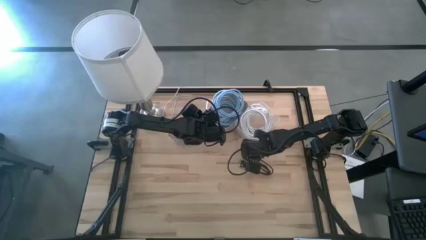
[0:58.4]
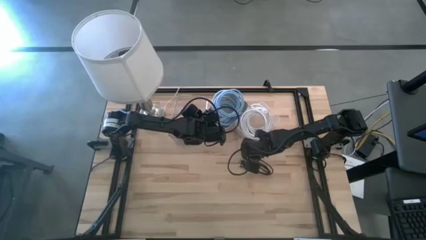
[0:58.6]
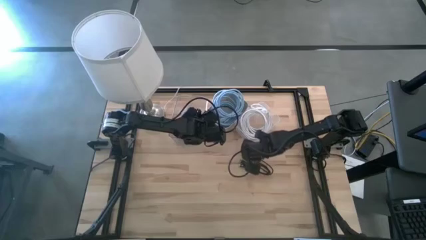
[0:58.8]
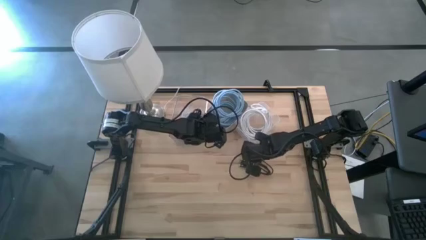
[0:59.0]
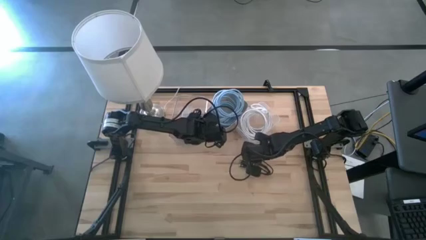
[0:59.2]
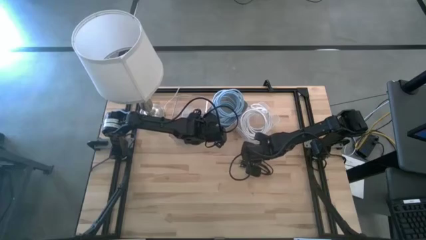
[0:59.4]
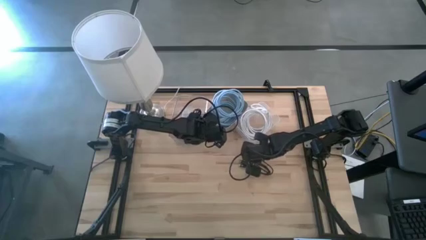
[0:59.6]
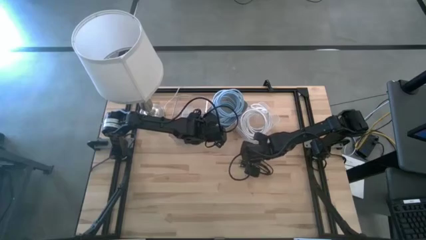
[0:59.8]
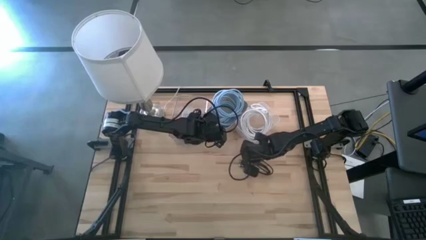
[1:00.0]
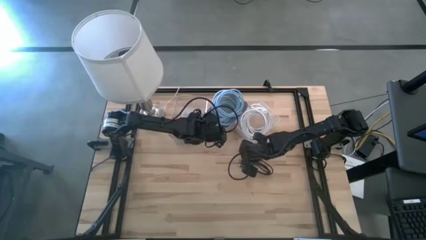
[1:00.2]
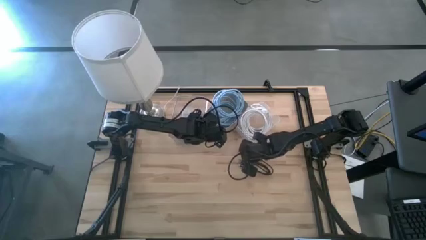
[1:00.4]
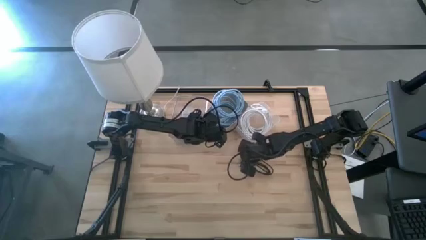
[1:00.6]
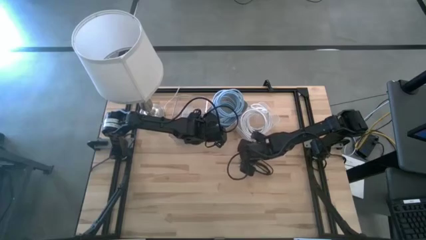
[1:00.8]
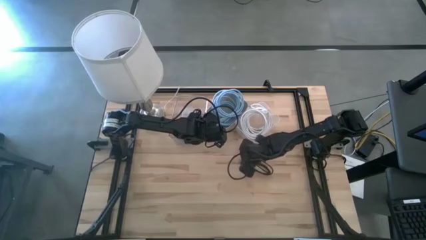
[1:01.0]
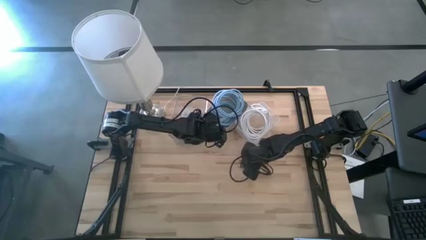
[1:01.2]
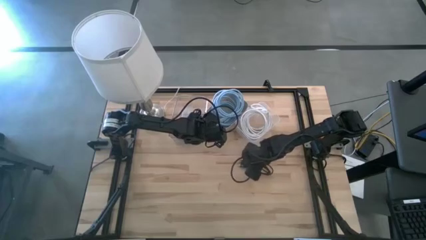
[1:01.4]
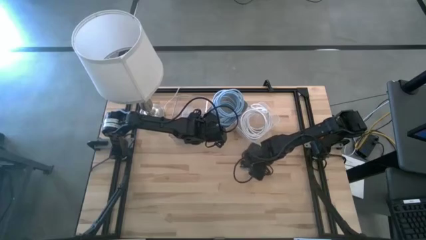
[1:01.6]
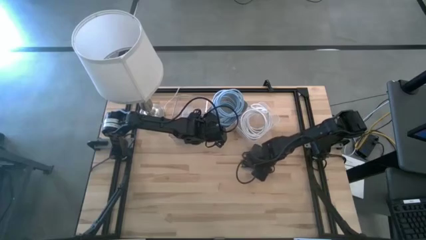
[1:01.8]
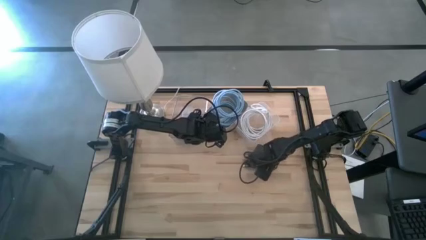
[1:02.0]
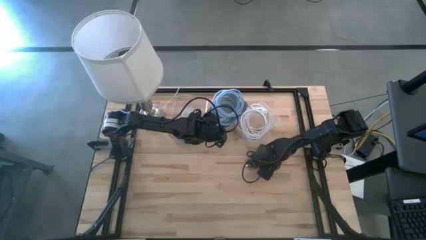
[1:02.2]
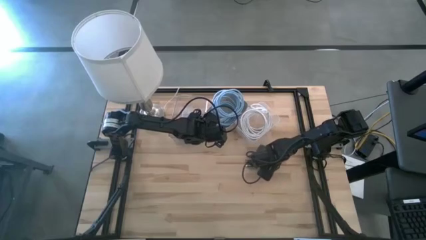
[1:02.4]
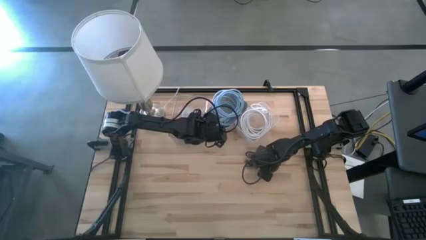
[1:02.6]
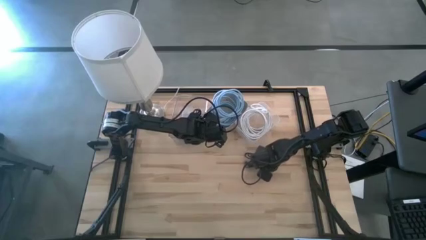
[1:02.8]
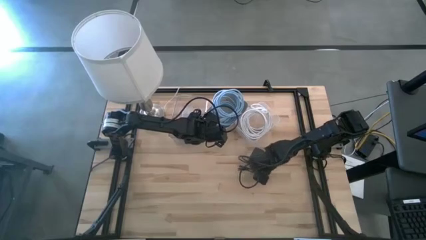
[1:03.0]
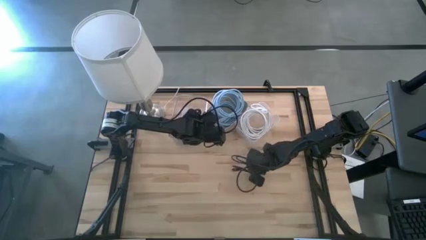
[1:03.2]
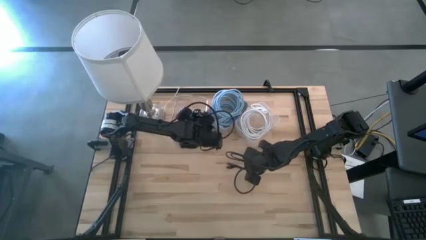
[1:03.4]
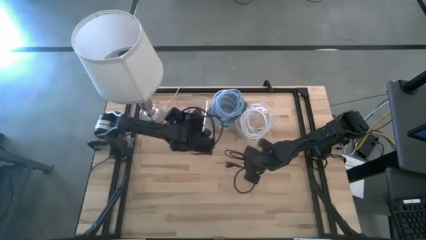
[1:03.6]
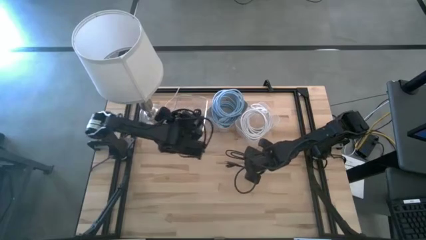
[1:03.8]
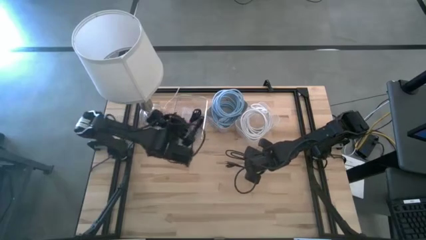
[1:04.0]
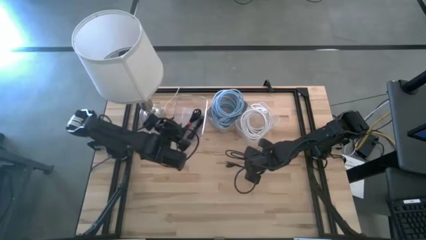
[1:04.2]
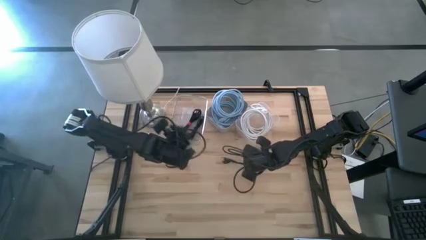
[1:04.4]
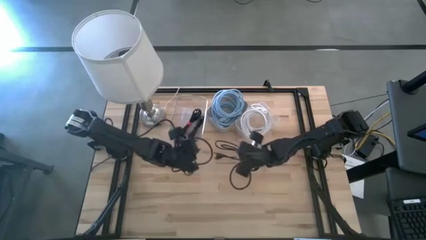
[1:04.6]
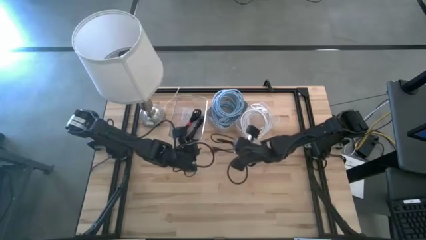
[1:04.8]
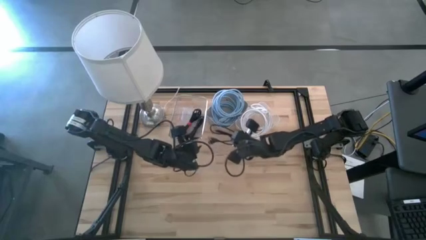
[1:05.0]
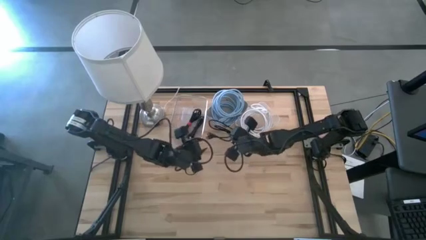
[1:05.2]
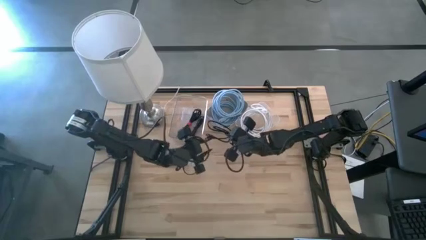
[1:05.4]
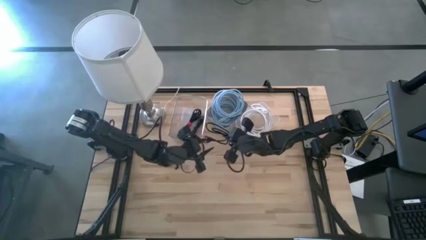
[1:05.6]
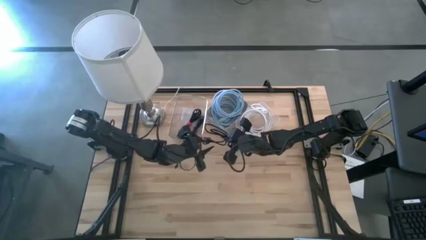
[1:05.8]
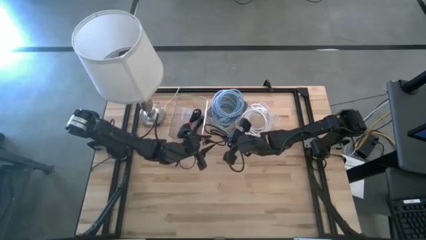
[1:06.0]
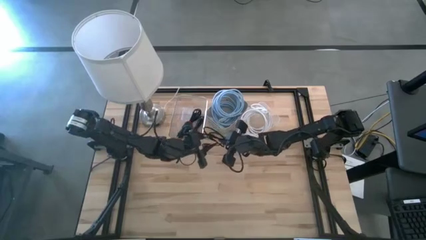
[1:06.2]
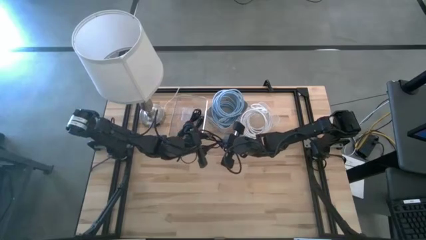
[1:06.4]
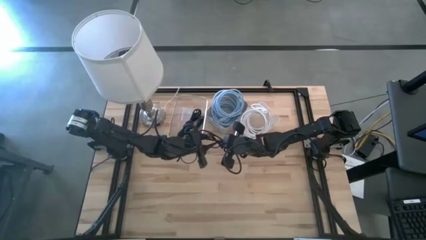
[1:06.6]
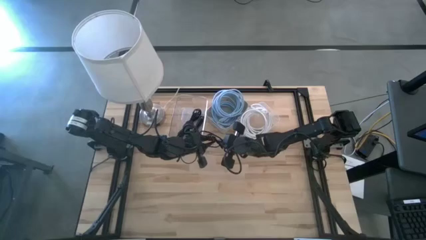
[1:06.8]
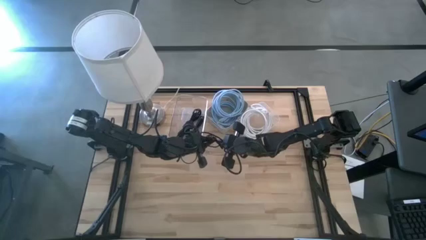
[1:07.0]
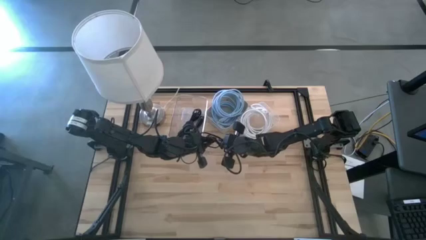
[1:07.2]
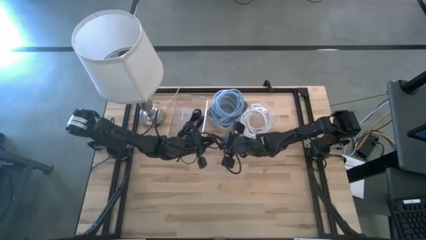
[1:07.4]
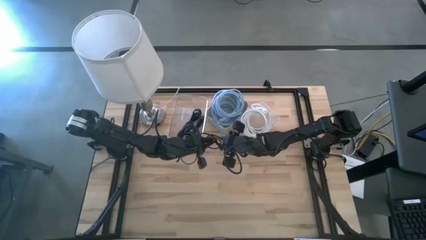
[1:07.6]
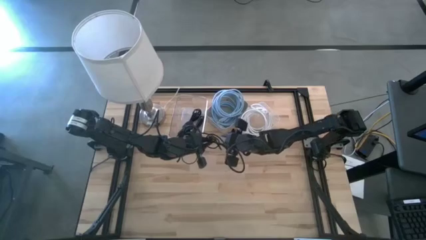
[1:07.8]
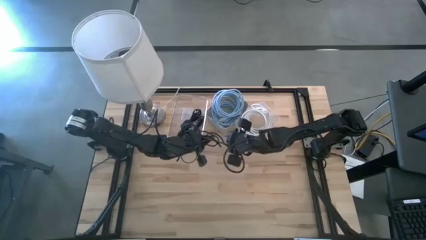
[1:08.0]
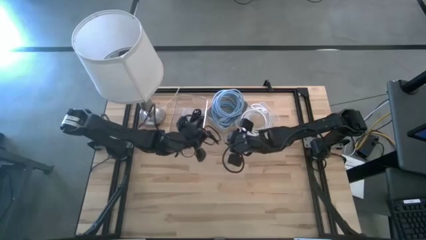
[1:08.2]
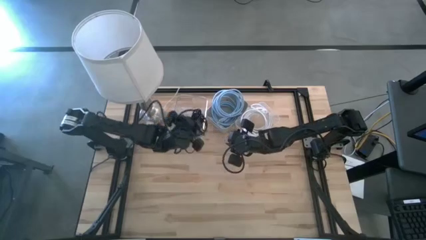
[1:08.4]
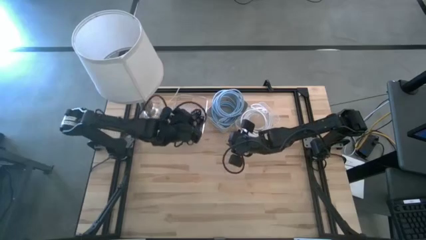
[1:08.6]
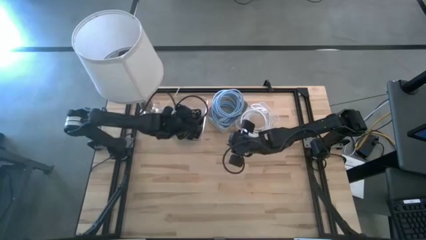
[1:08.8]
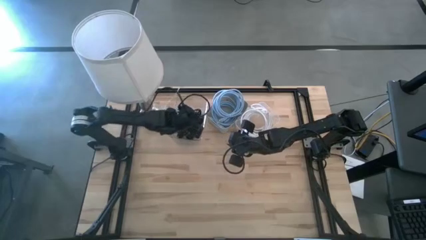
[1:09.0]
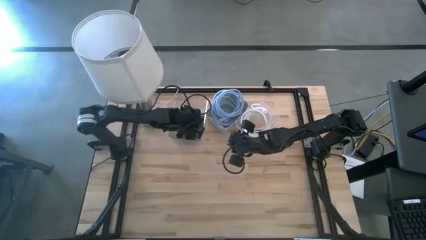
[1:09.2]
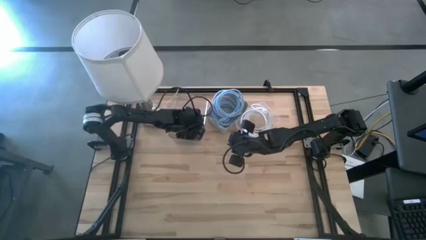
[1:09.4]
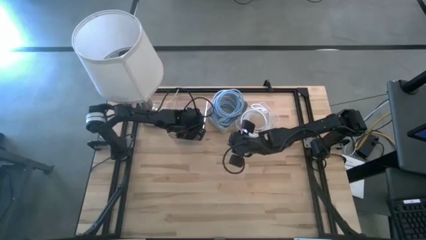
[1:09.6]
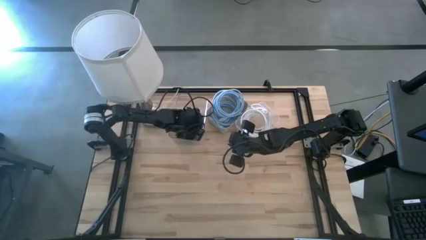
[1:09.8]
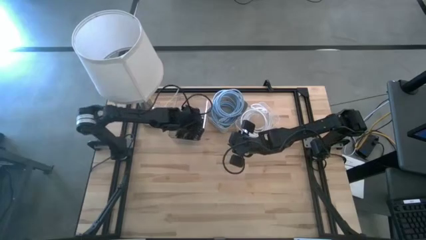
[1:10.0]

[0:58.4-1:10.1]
Task: Sort HDMI cables
Put the black HDMI cable into the left transparent bin

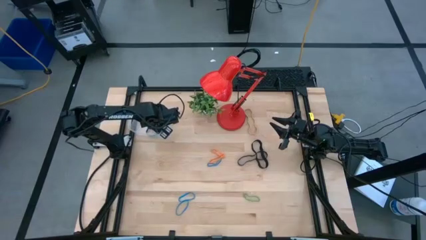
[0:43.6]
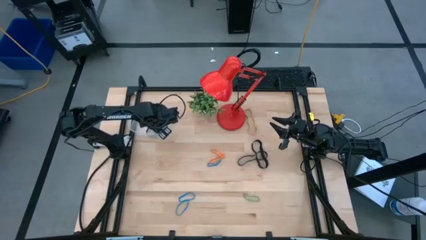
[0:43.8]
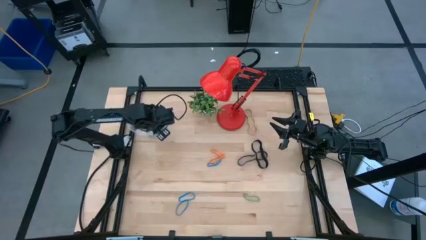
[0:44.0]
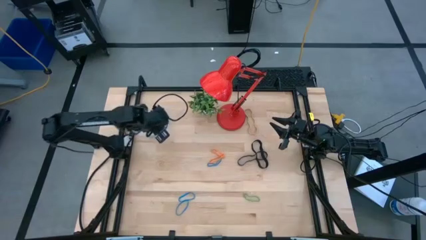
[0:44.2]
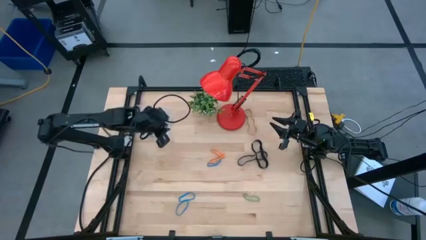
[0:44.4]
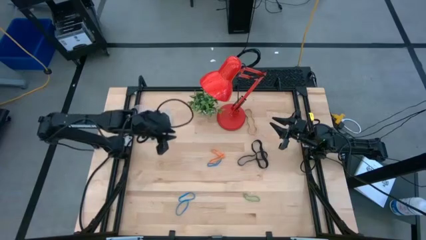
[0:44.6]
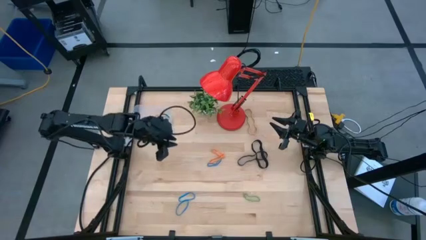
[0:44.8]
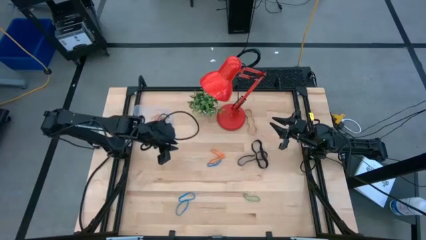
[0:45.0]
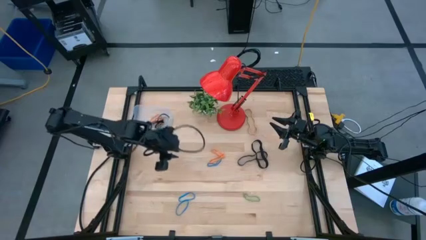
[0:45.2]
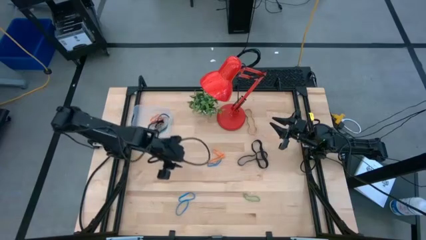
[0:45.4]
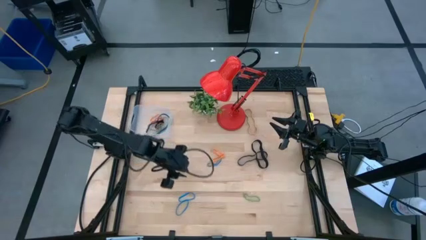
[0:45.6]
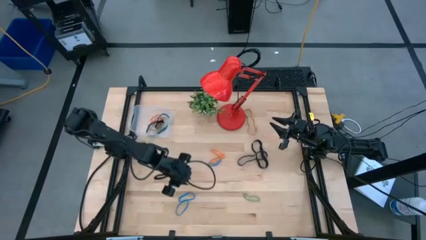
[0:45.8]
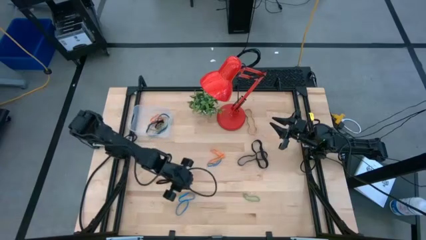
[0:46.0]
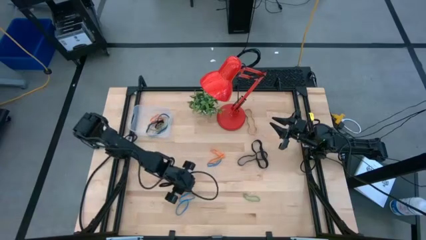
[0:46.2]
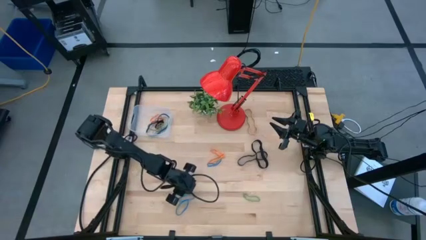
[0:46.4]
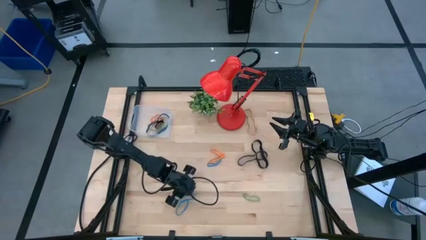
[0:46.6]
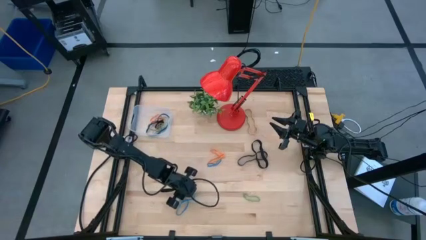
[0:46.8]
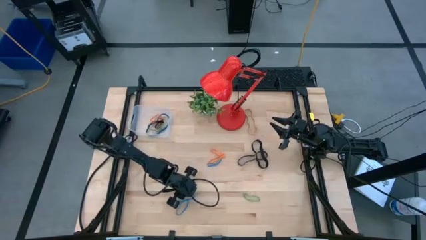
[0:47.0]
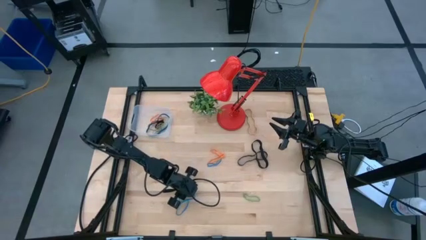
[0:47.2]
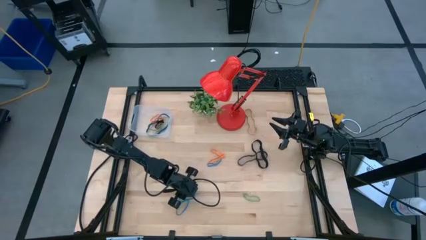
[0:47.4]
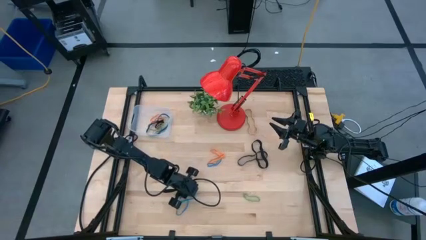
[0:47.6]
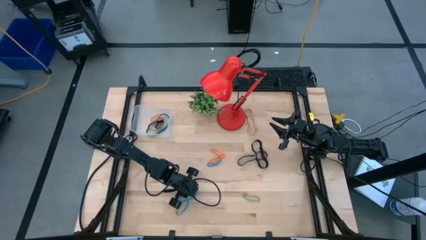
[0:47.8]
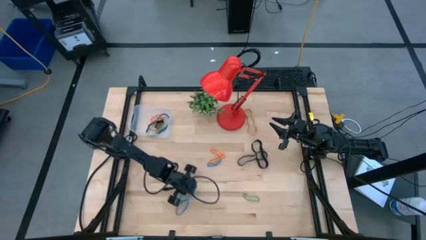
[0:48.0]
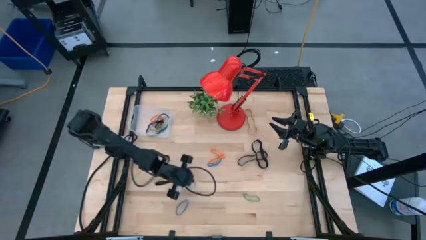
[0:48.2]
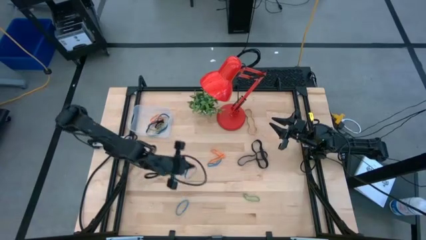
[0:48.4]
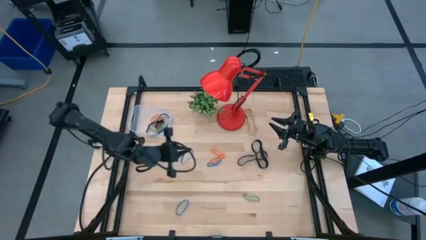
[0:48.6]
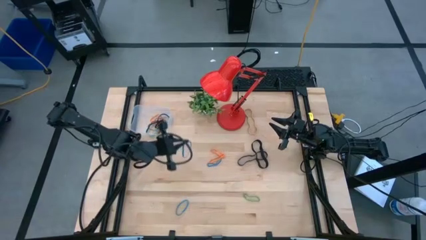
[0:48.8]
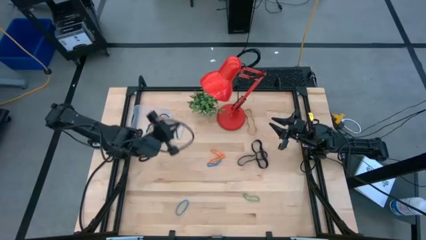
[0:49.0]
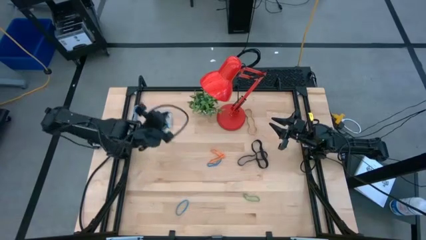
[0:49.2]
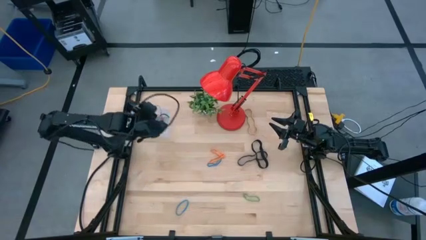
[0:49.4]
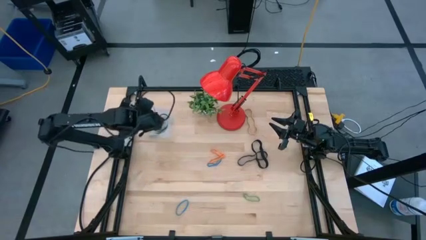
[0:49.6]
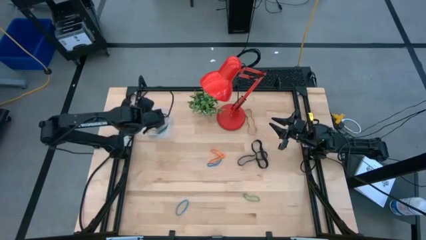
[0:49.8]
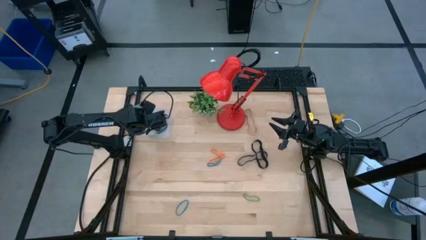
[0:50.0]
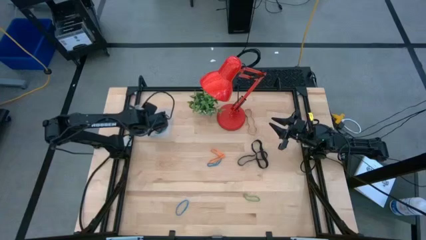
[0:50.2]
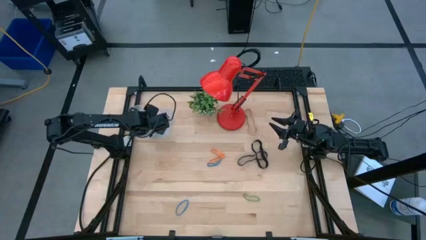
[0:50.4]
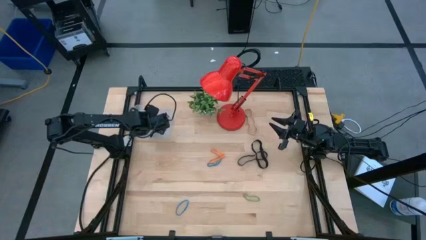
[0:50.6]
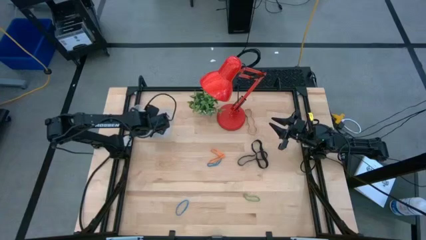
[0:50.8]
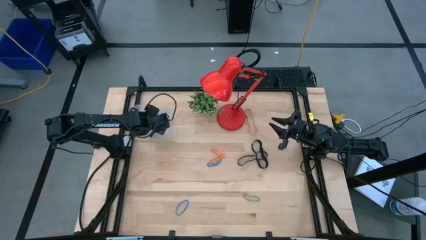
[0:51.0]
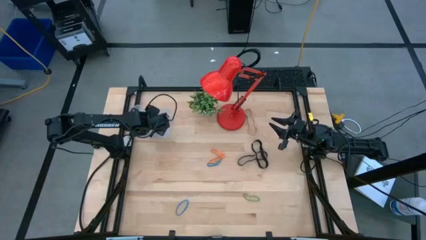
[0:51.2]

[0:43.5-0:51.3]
Task: Pick and place rubber bands into bin
Put the blue rubber band into the transparent bin
